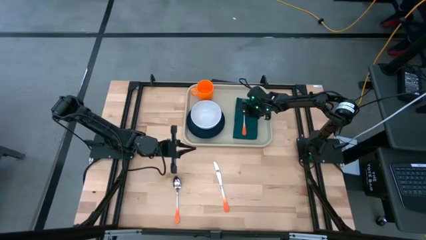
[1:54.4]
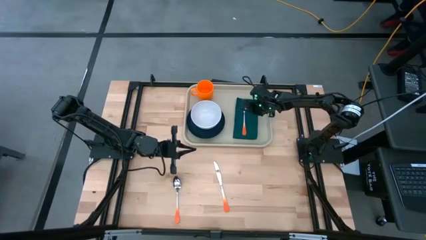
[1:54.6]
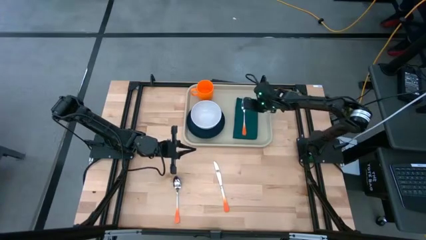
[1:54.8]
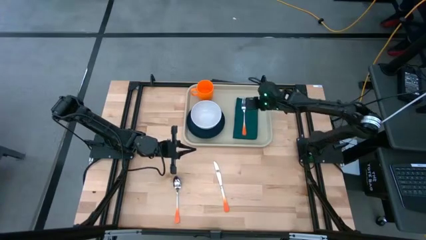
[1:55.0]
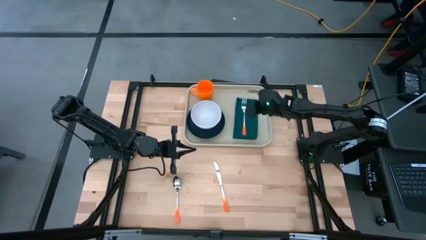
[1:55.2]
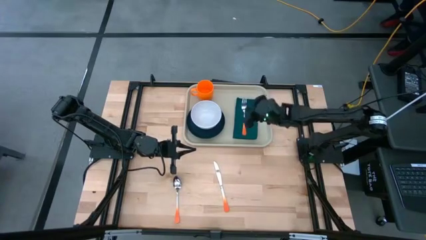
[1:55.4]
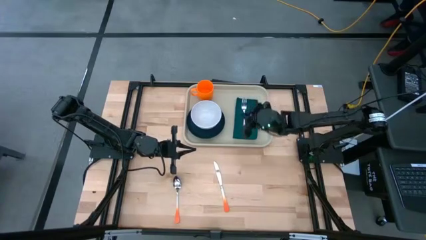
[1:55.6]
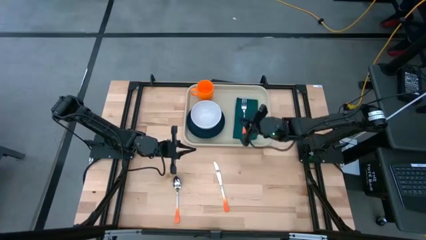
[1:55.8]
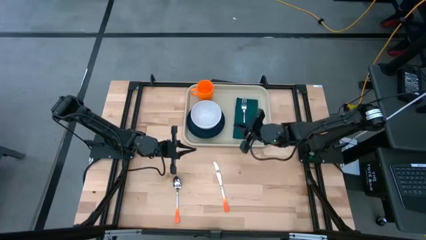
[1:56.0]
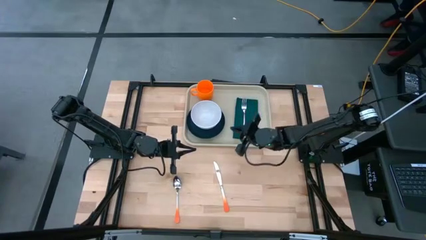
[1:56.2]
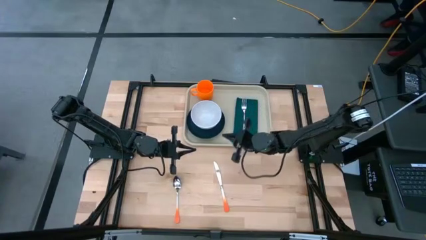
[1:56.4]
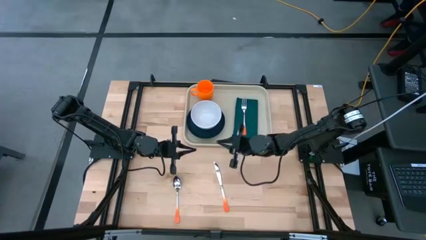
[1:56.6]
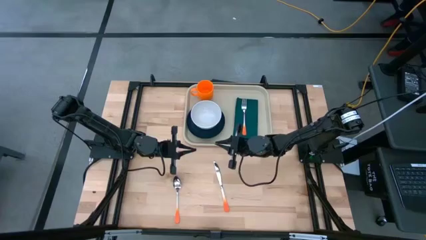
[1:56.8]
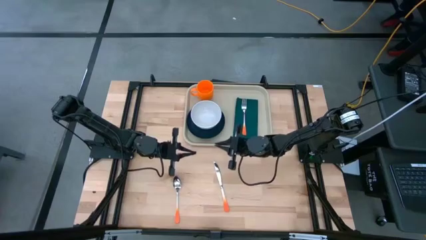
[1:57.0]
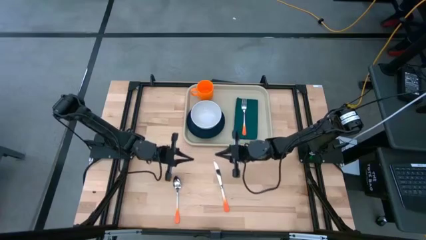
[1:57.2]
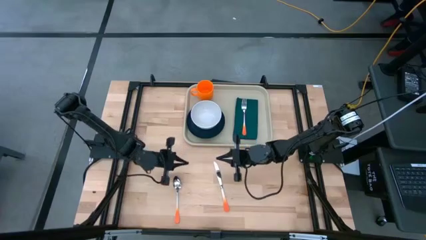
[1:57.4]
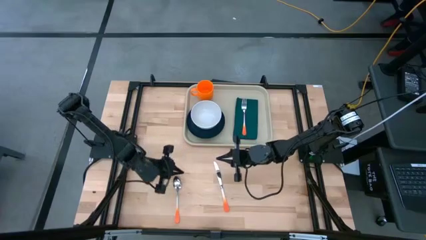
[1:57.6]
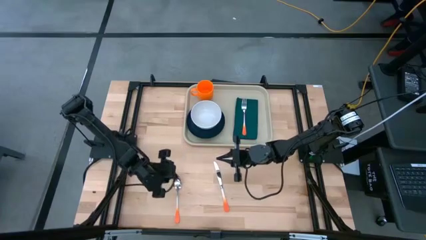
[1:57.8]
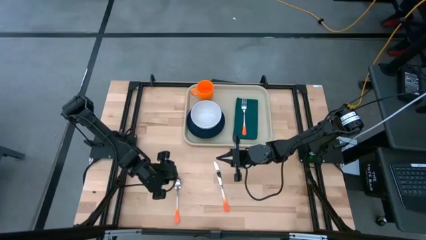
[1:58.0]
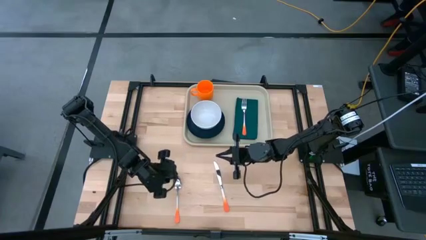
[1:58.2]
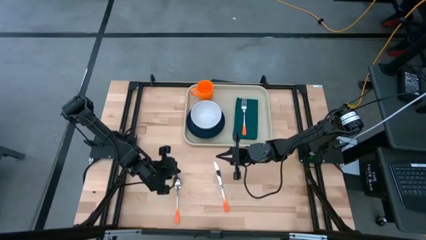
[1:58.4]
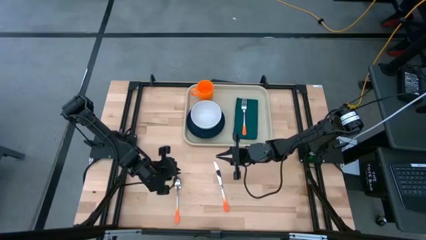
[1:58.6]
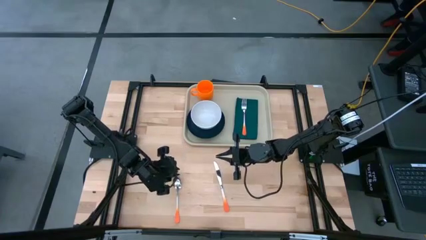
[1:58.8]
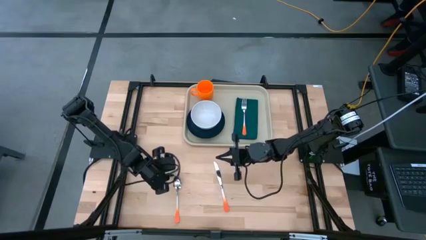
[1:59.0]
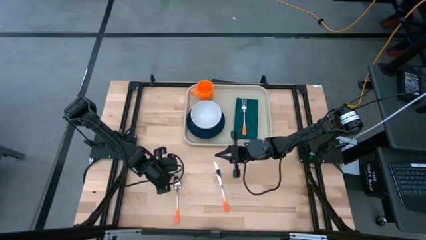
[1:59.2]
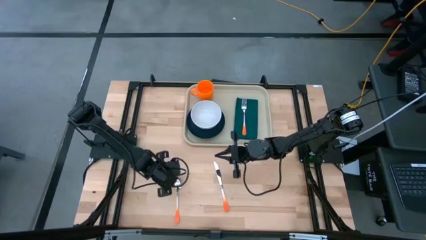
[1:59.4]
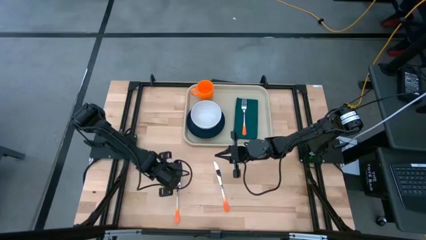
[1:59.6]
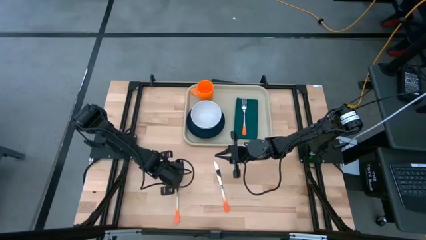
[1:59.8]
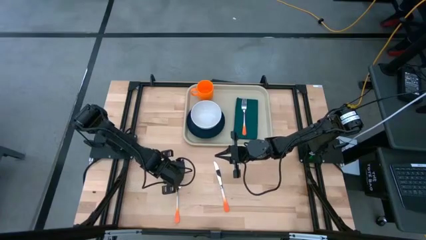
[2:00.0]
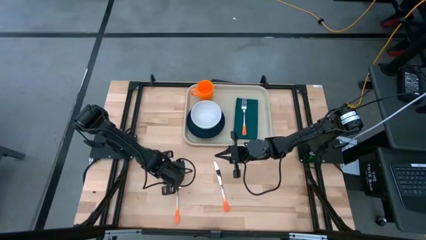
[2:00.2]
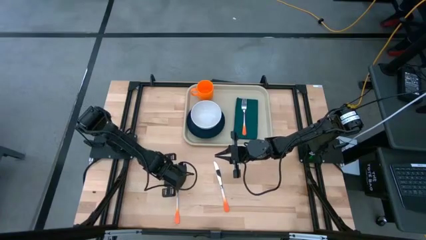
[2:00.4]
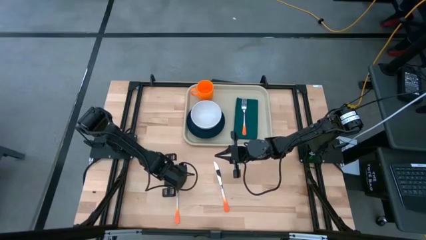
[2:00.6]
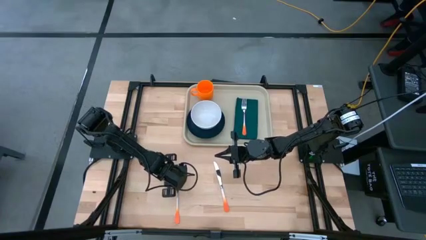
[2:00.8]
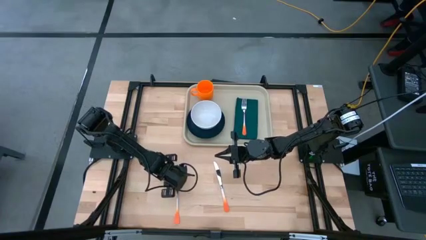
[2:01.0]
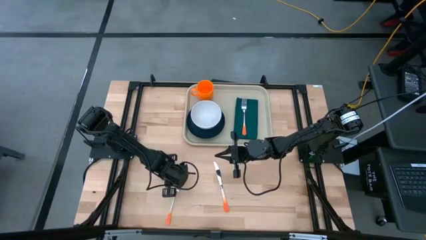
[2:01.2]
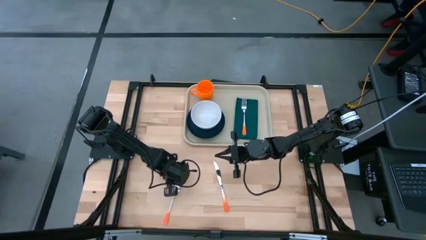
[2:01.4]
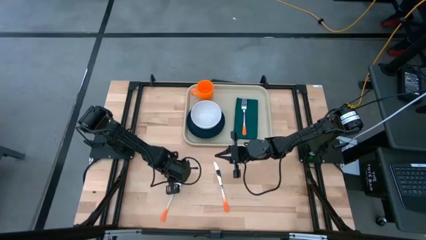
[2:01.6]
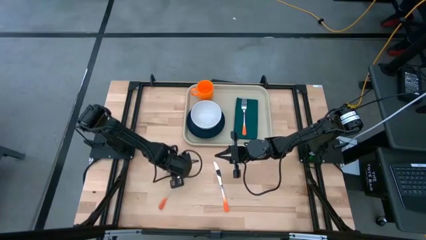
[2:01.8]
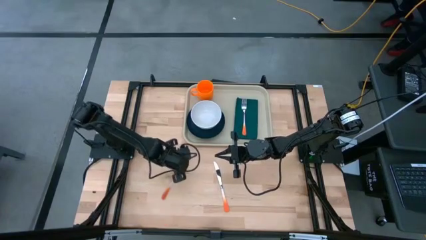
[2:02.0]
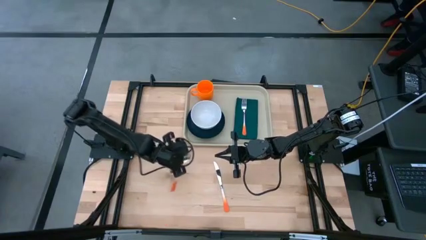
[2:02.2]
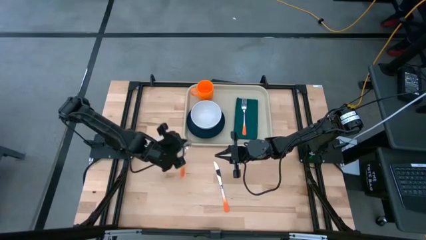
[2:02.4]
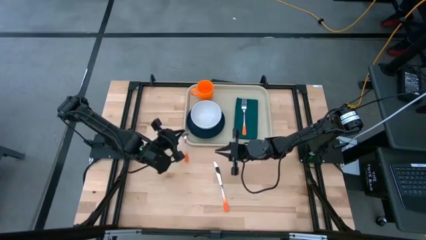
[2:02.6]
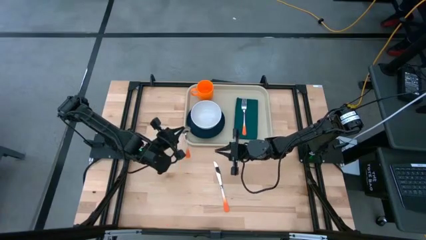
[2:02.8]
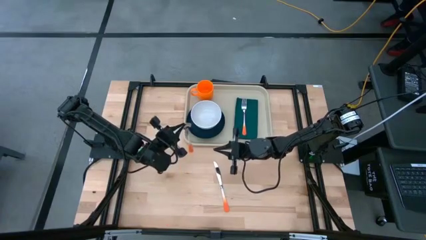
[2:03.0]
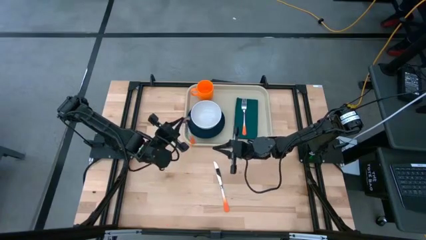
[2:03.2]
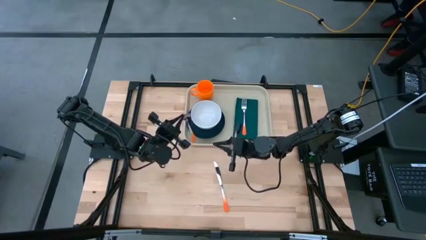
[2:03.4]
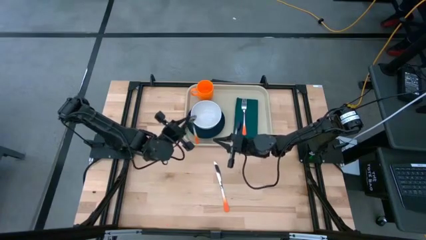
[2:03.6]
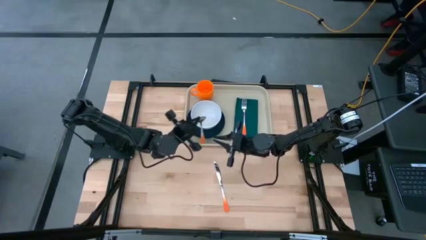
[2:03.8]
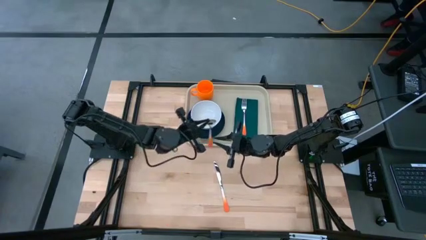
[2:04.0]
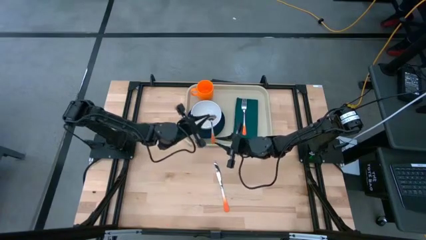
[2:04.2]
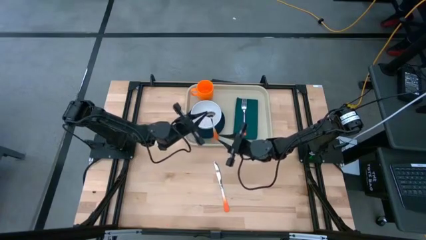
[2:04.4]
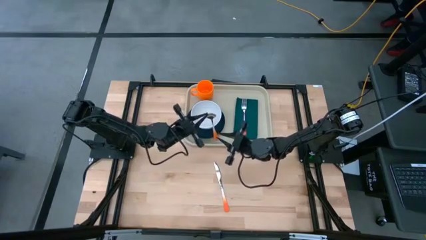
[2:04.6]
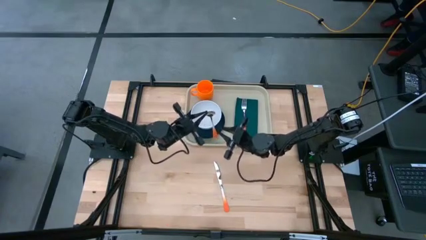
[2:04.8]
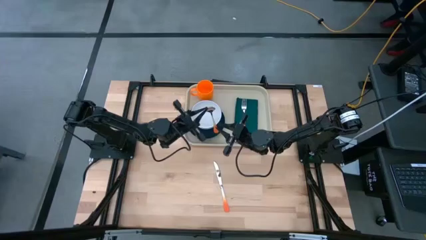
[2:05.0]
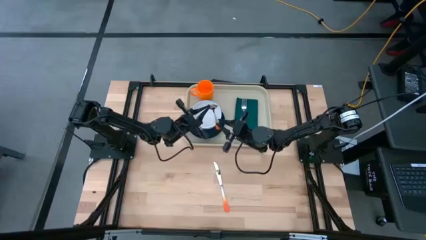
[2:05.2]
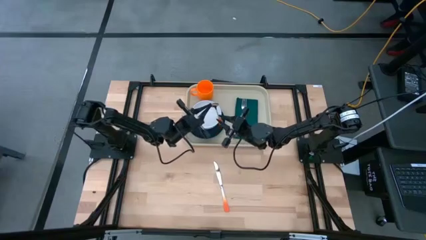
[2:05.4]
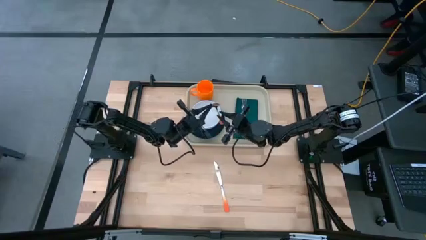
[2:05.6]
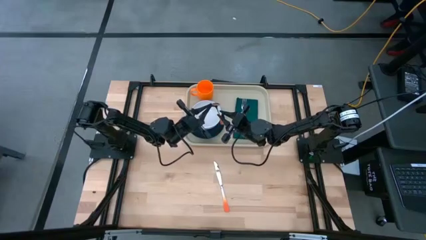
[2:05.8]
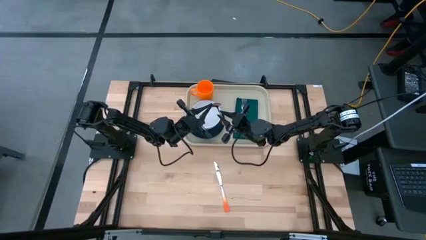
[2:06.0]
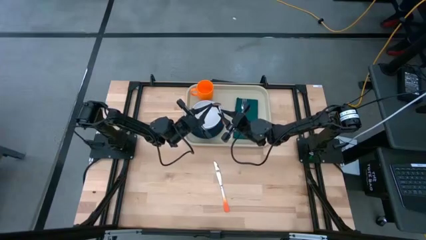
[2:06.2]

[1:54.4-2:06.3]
Task: Set up tray
Put the orange spoon on top of the green napkin to the left of the orange fork on the gray serving tray

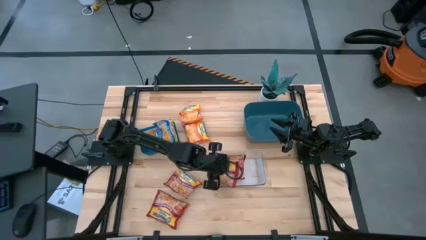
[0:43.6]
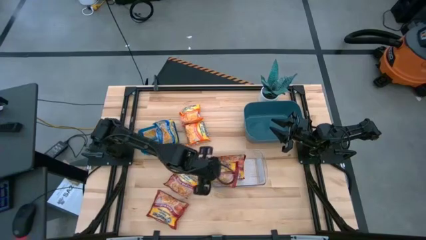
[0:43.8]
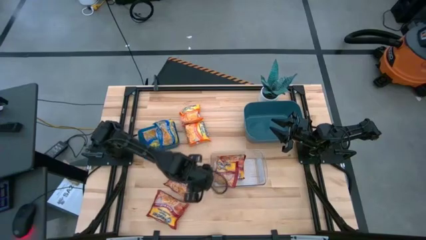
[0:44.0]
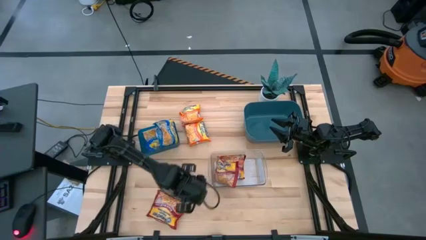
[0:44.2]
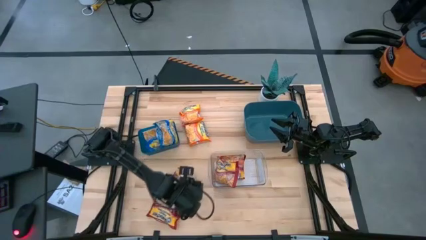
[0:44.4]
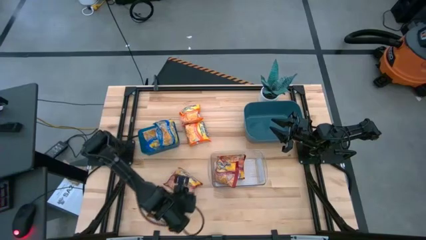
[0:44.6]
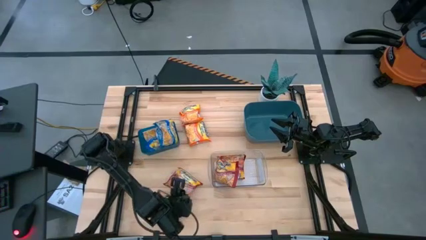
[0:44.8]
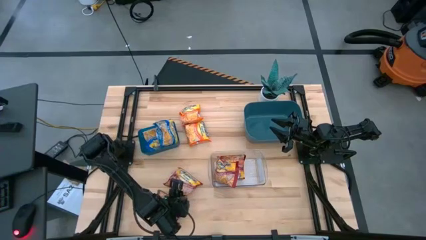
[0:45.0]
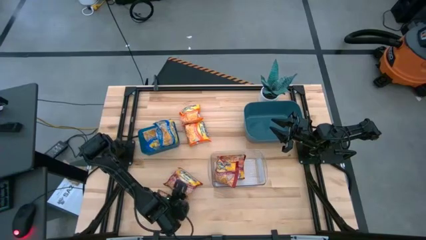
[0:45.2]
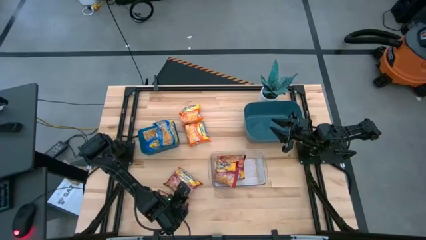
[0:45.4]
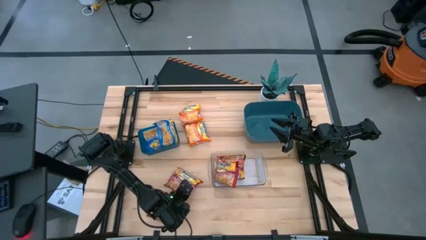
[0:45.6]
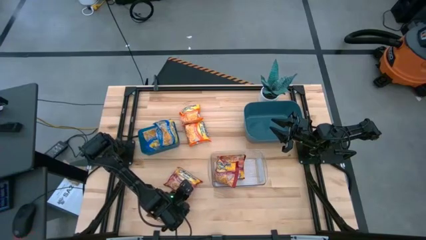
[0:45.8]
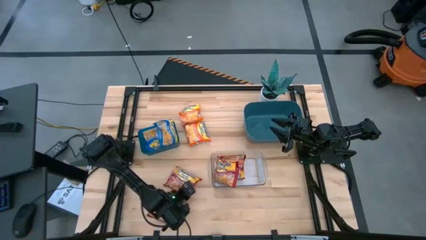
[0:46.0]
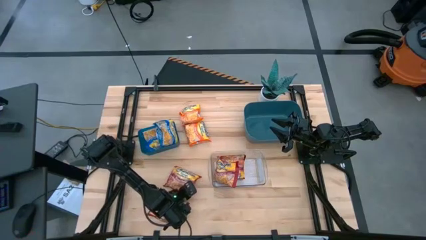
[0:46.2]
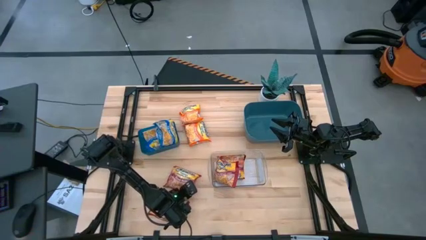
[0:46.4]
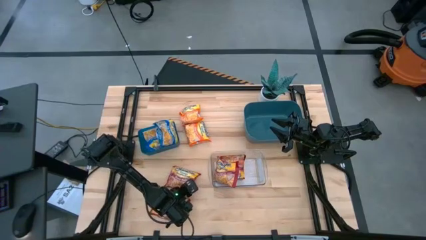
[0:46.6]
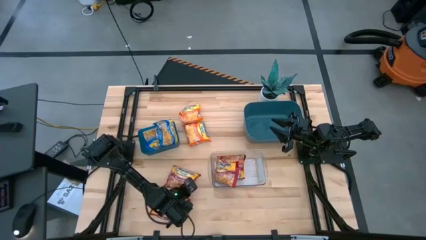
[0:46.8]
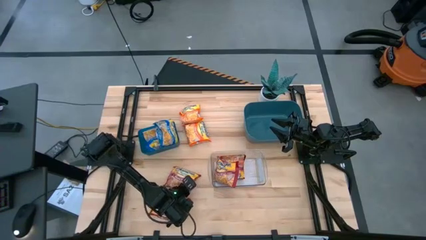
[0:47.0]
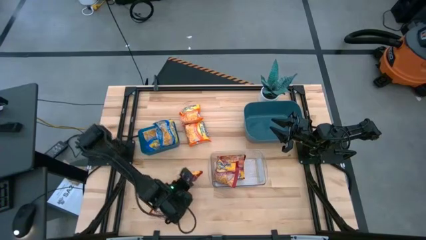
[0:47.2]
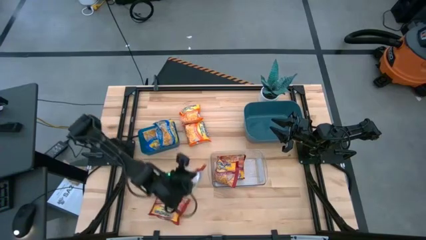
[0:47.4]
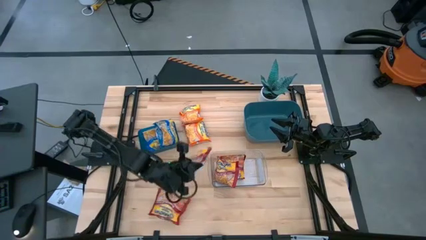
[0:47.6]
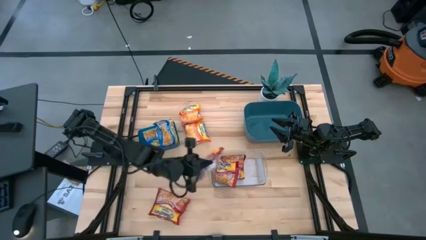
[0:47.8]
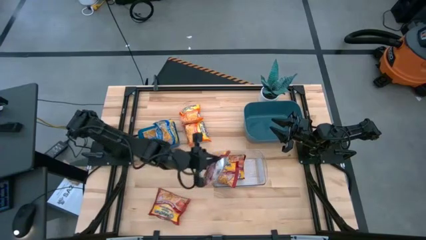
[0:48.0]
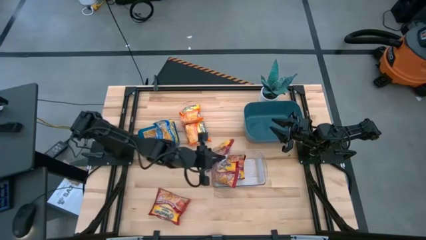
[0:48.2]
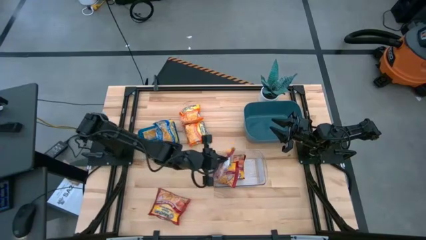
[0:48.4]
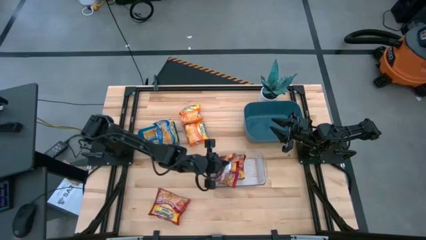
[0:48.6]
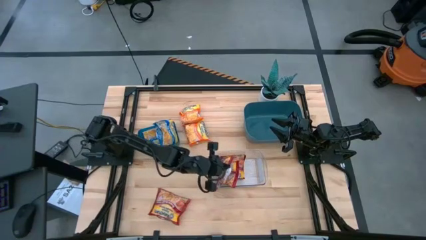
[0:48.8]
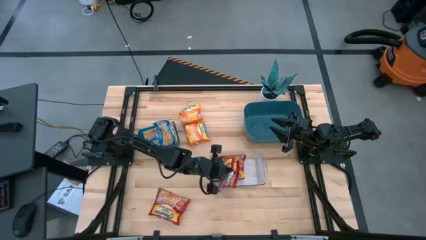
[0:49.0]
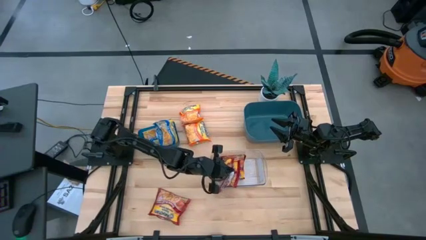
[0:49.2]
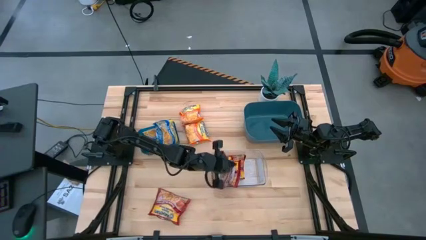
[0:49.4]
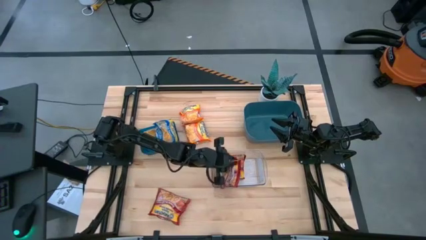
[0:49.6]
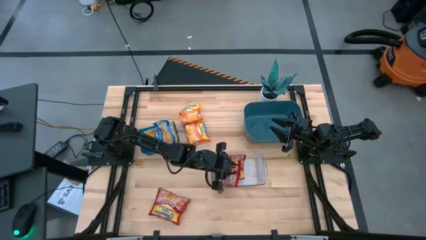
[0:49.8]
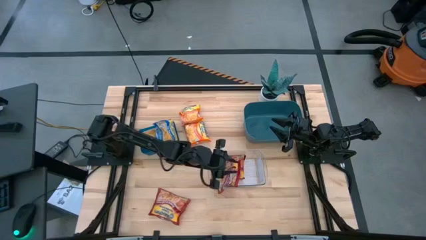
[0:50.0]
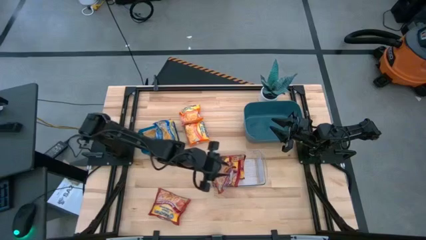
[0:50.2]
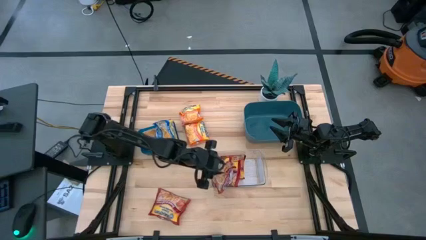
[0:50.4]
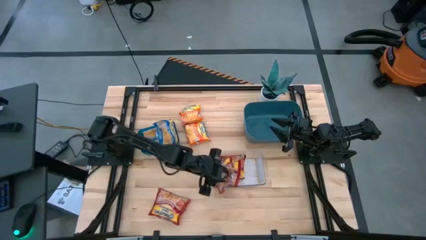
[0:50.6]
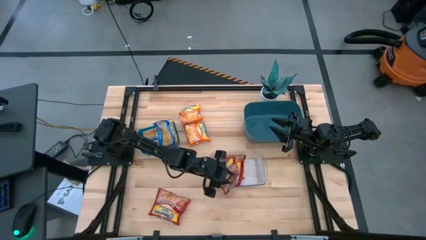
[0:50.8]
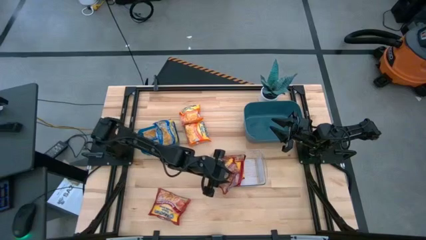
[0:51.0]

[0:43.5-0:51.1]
Task: Sort Maruchan noodles
Put the red noodle pack into the transparent bin
